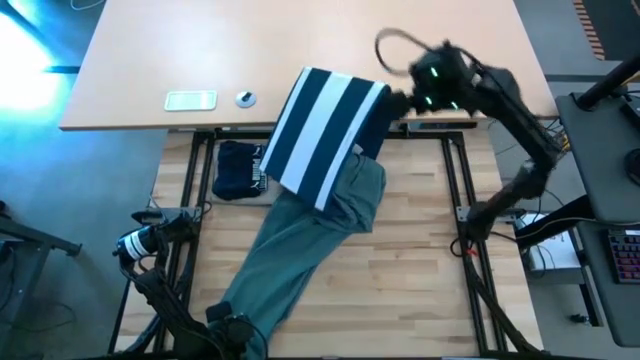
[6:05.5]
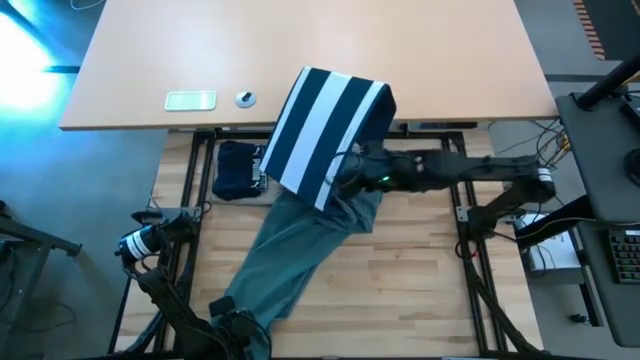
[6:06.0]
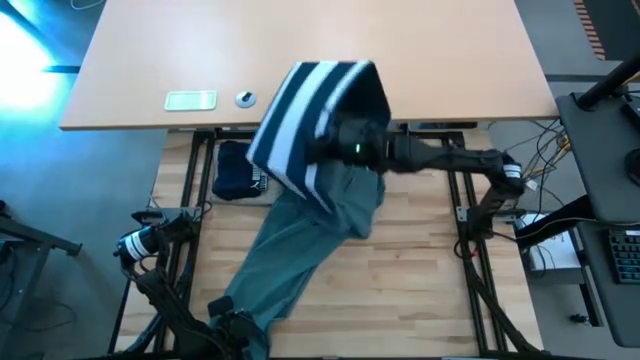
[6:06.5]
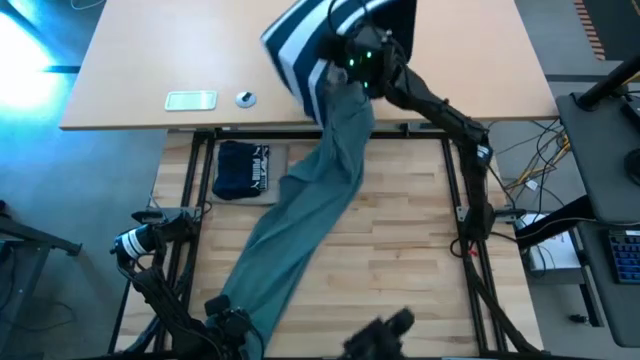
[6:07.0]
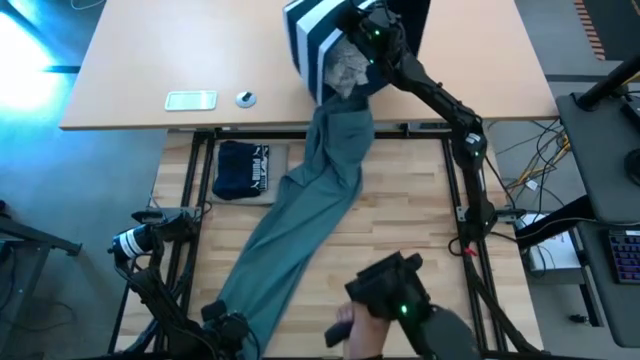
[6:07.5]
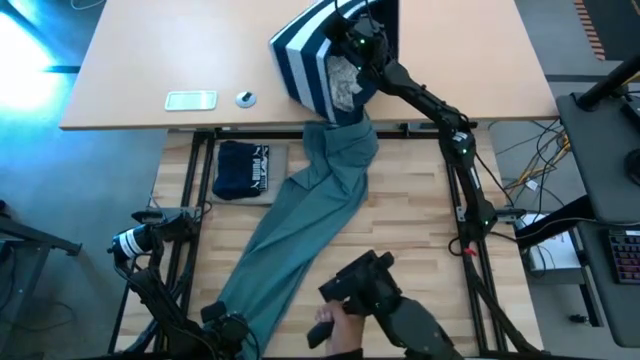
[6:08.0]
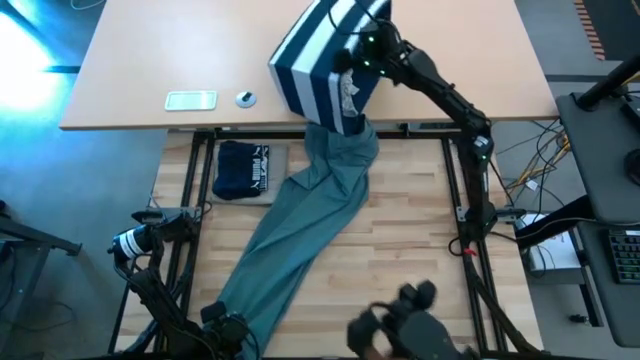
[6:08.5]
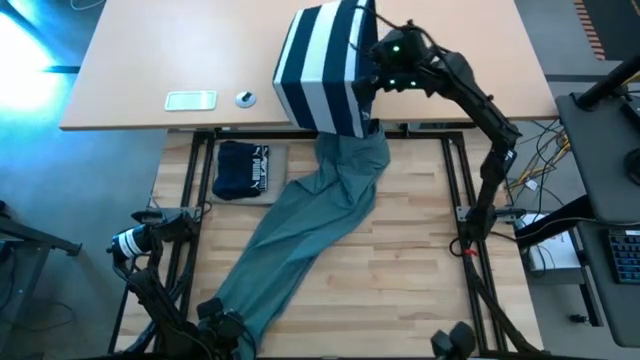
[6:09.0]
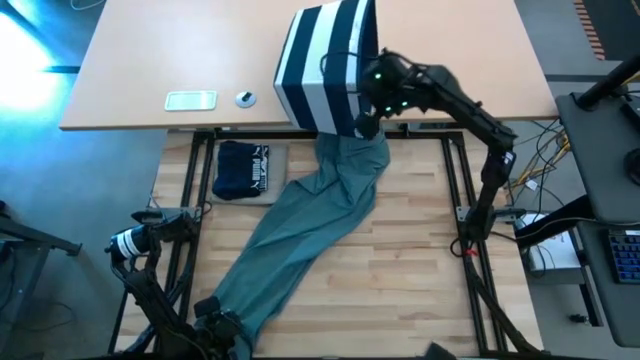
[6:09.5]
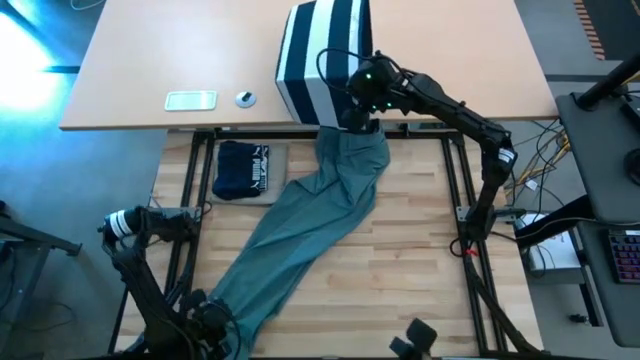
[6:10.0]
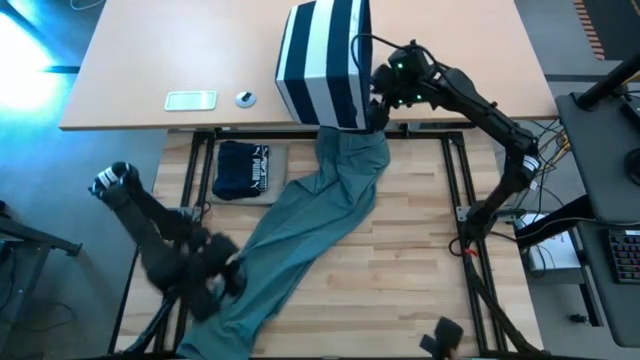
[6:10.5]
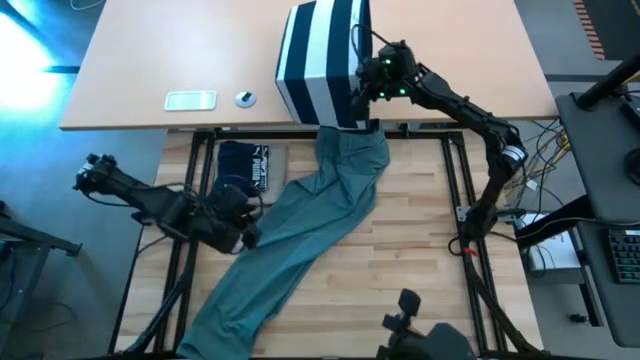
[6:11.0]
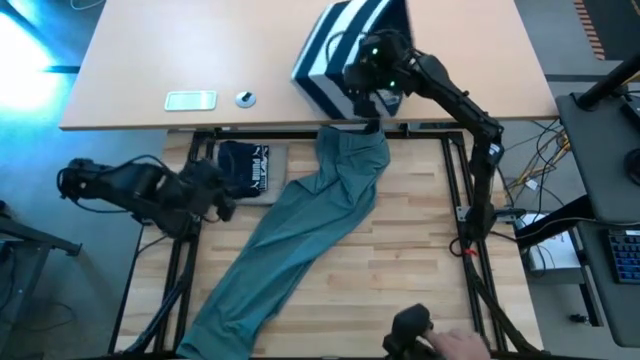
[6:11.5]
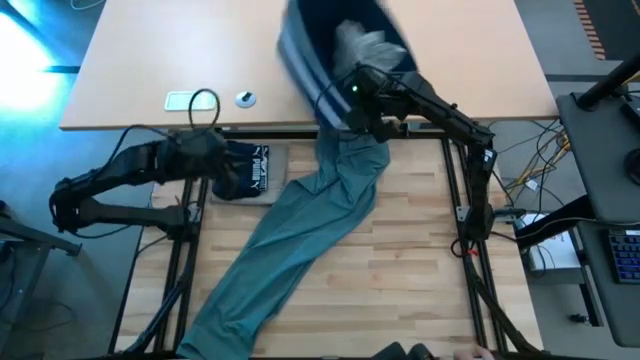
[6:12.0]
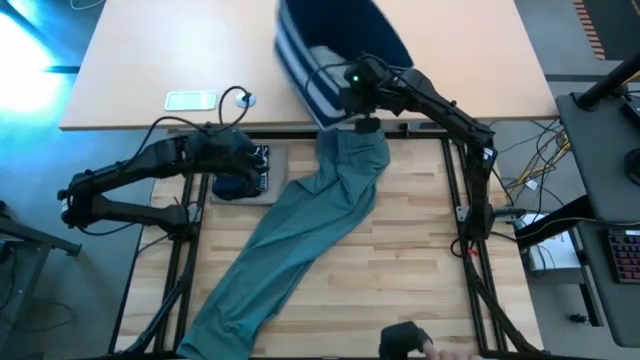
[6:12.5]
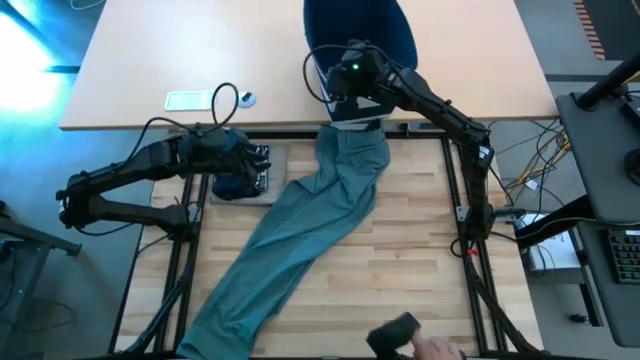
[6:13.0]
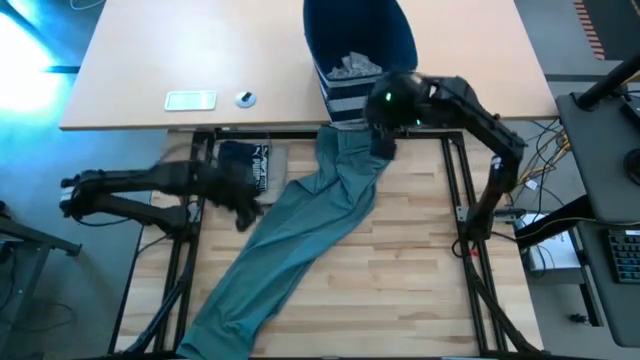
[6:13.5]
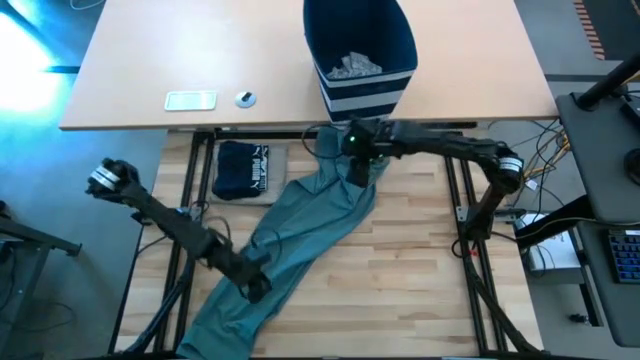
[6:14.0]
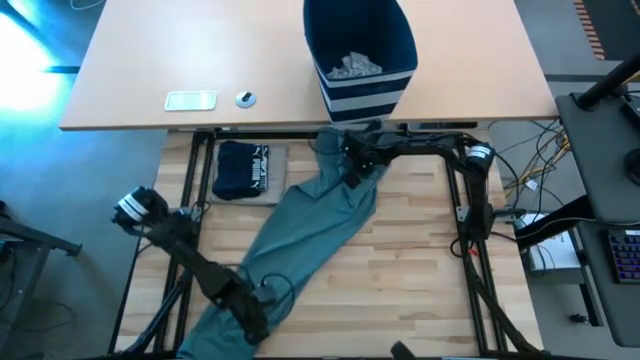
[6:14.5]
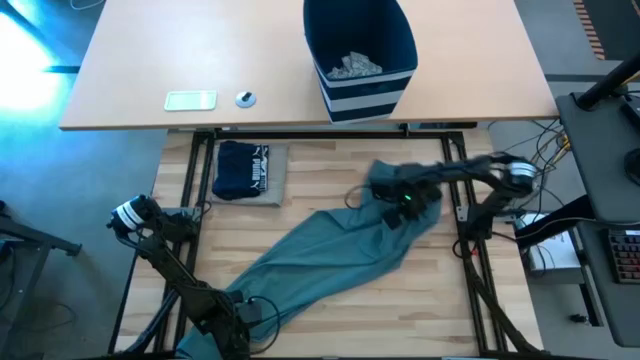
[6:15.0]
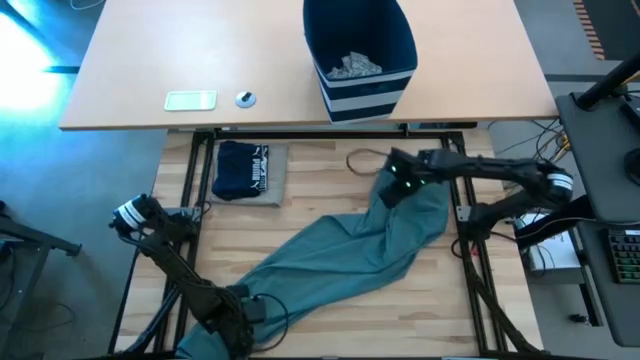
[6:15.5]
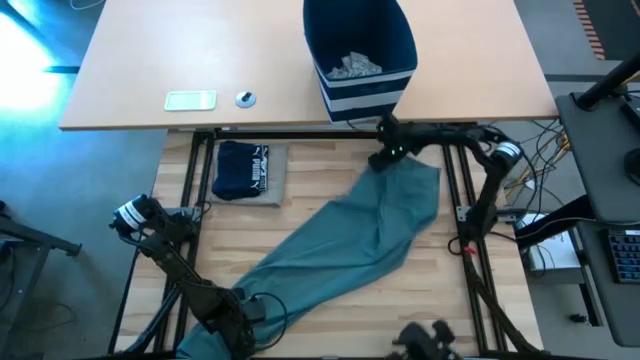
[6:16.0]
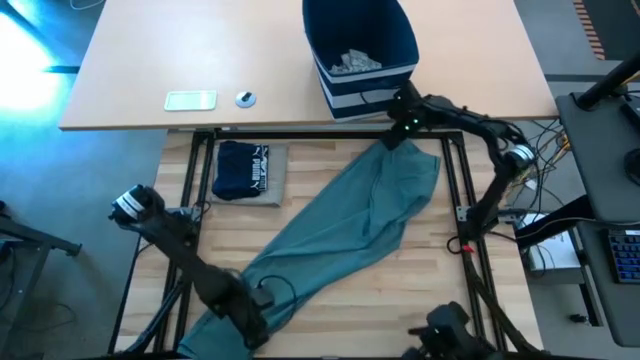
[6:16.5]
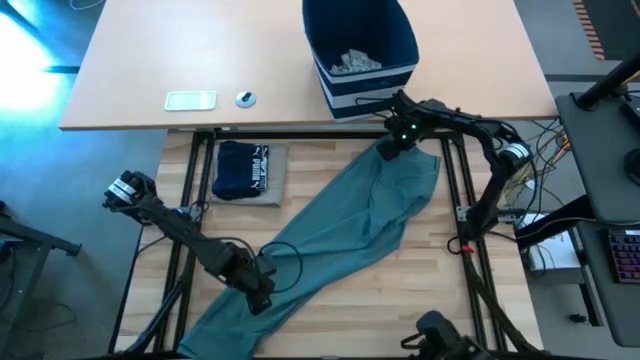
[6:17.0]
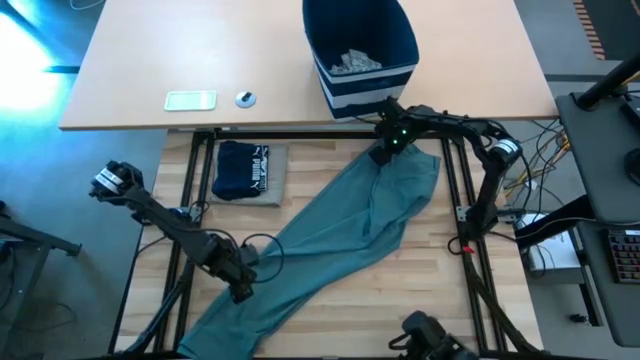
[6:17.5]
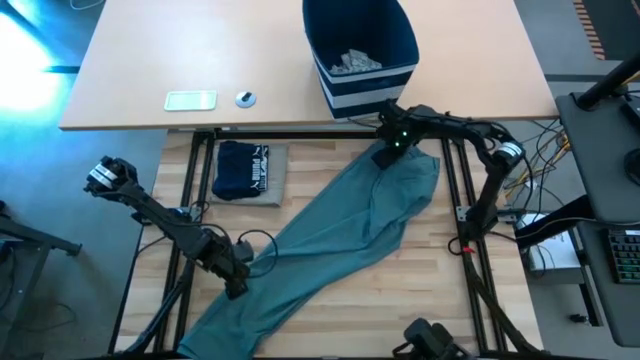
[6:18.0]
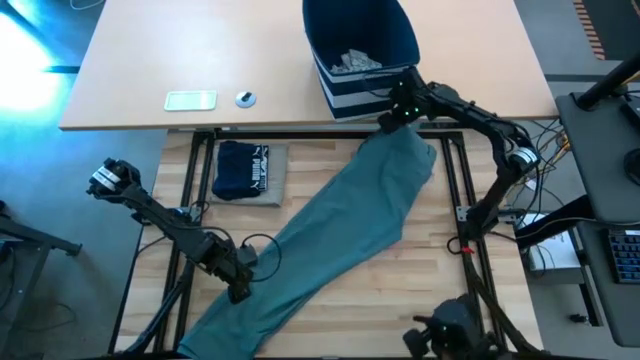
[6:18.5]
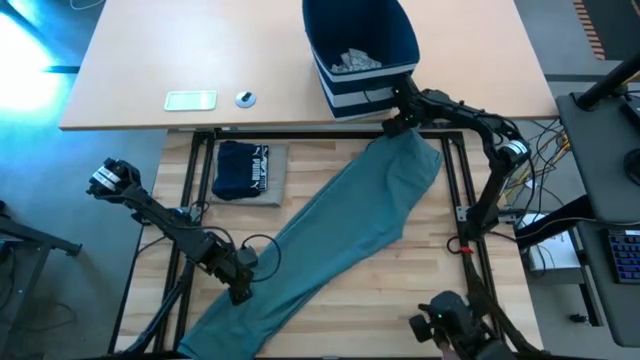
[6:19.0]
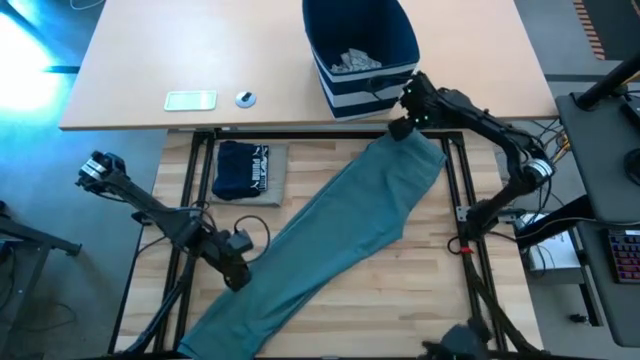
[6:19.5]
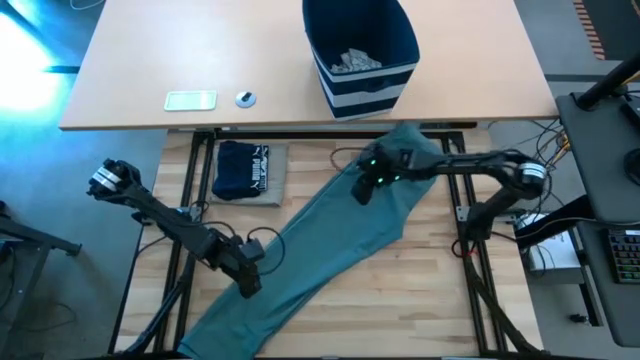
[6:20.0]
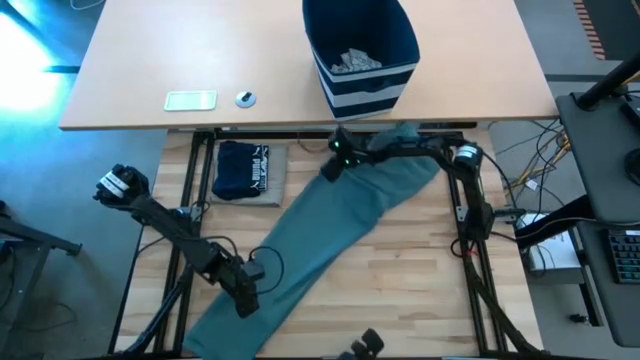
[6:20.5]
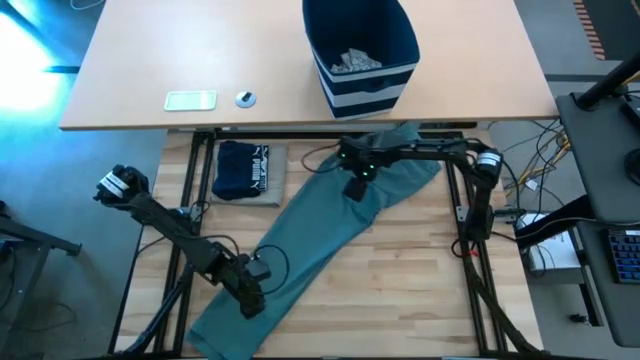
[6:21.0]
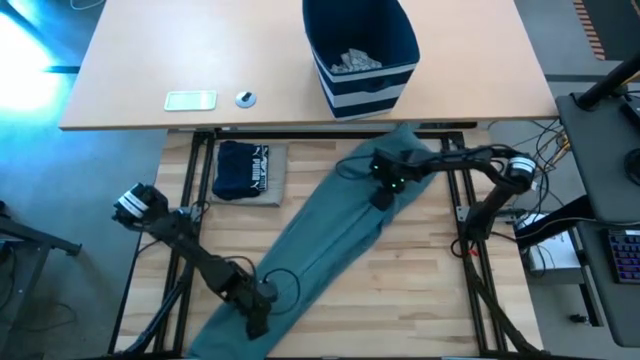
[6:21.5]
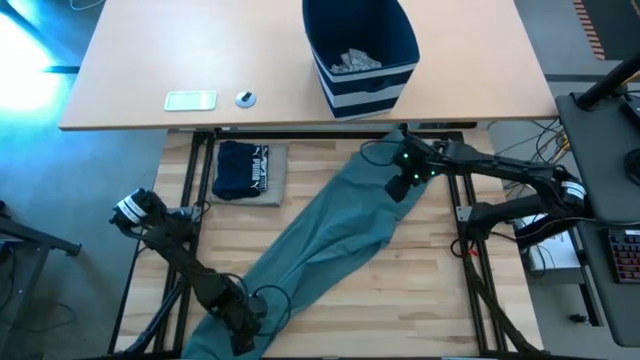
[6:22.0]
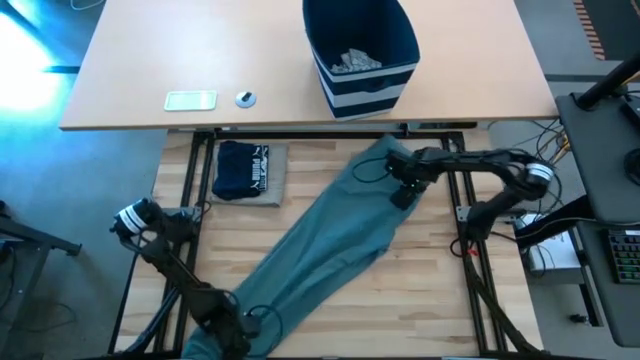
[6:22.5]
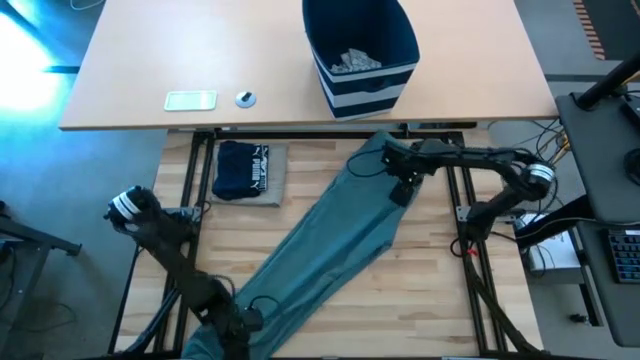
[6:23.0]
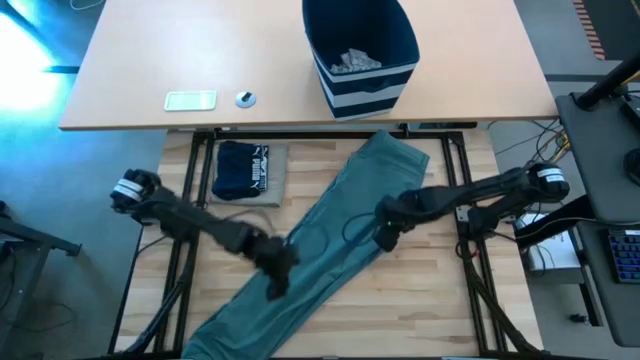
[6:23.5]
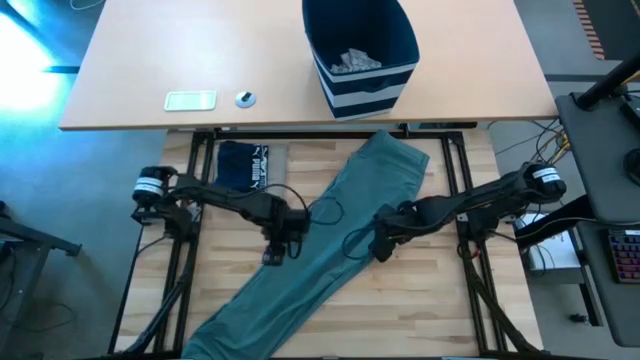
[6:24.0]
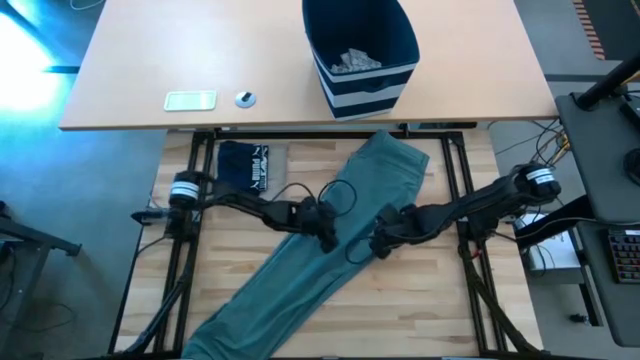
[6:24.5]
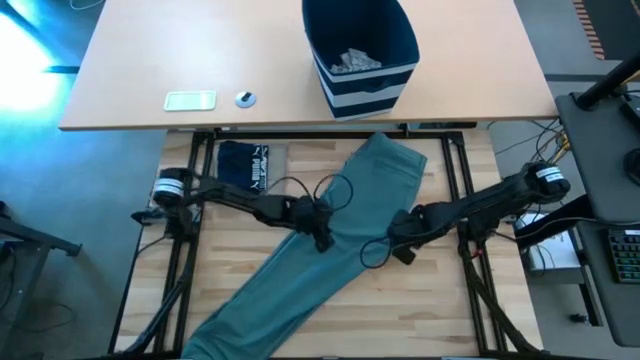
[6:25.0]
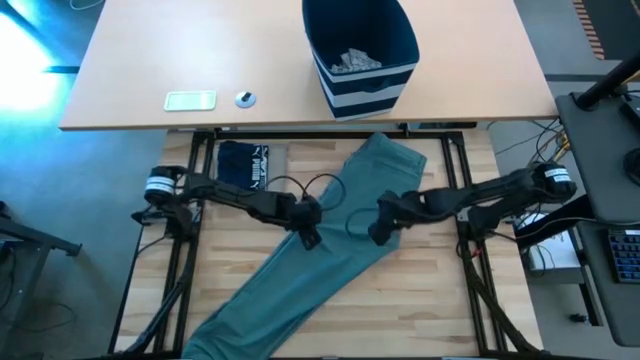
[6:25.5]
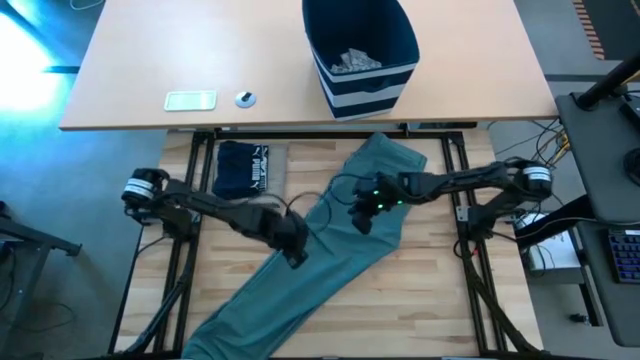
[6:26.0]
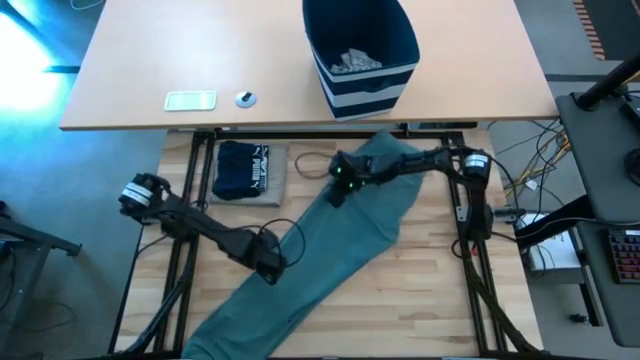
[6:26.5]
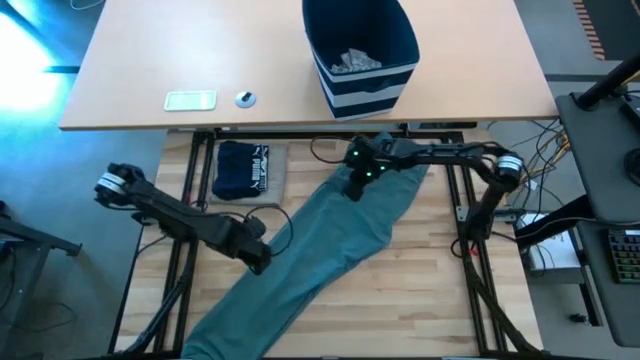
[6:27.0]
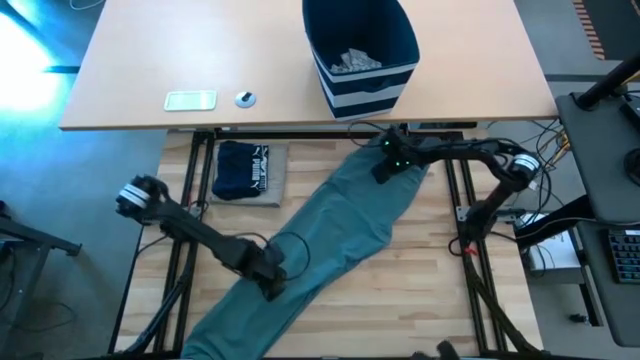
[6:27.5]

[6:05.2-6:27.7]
Task: Fold Laundry from Bin
Fold the gray pants
